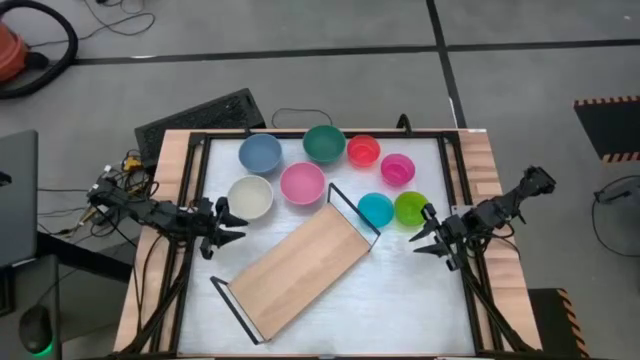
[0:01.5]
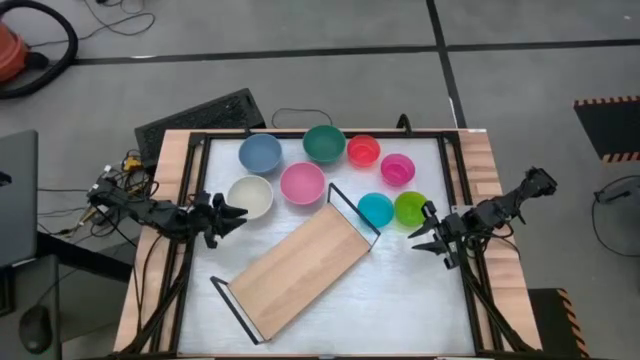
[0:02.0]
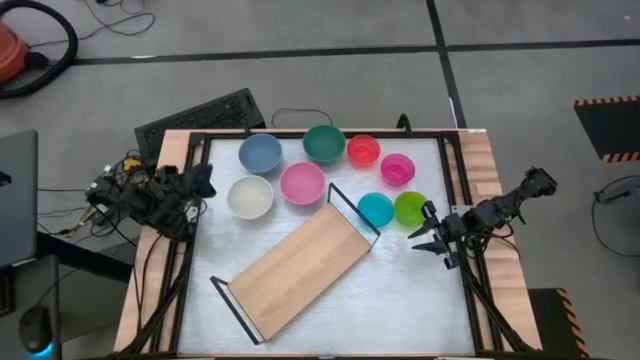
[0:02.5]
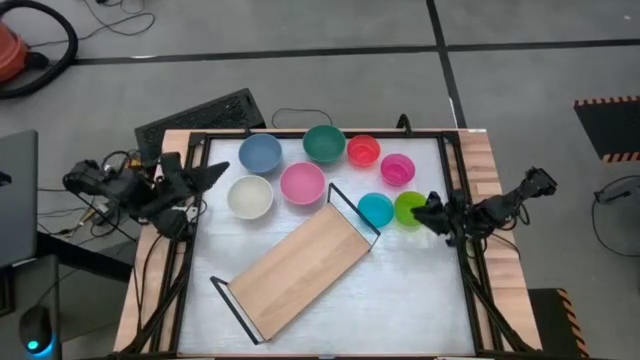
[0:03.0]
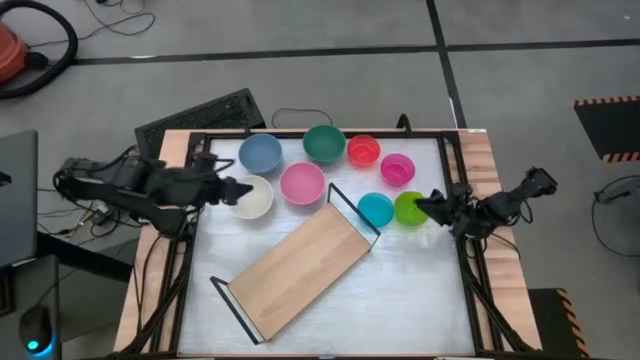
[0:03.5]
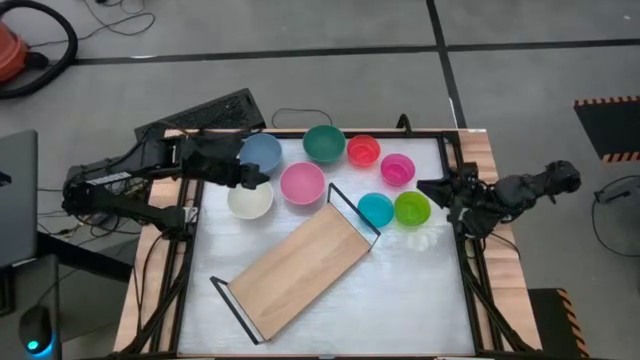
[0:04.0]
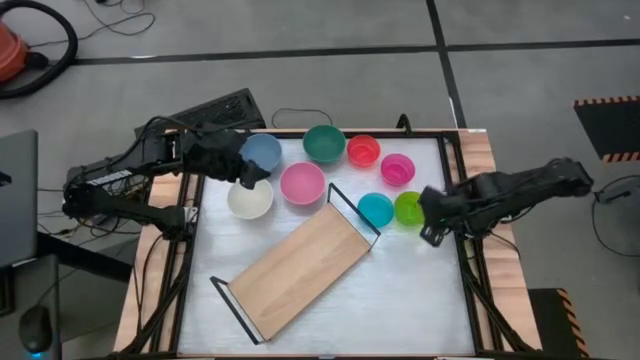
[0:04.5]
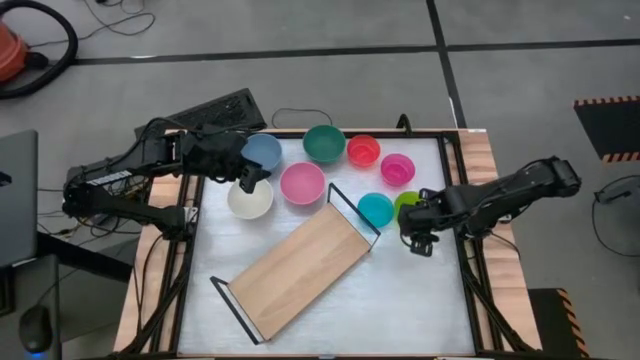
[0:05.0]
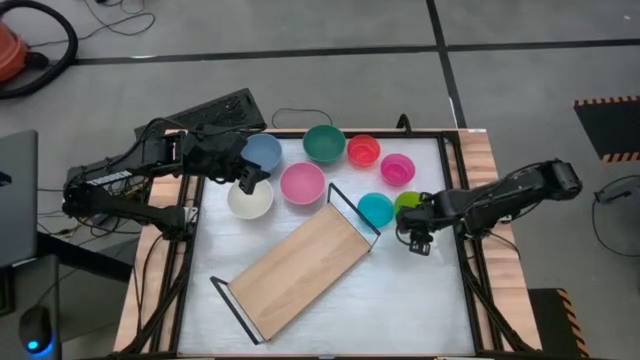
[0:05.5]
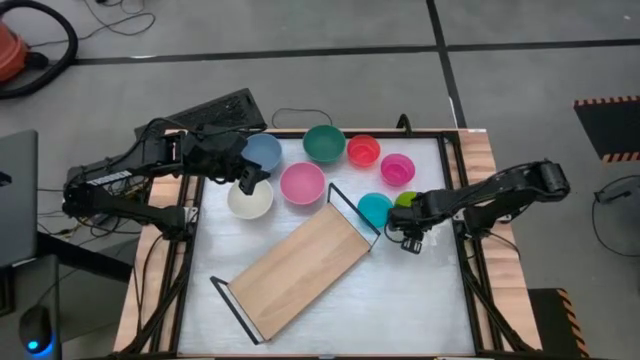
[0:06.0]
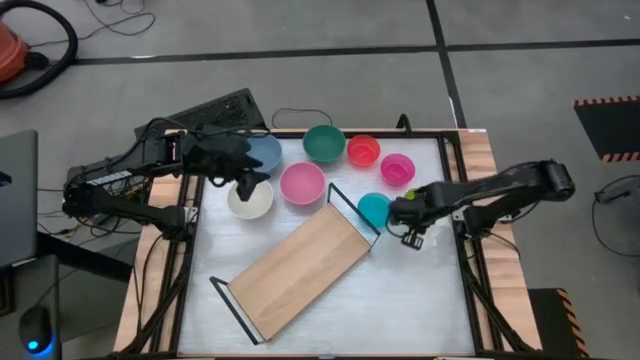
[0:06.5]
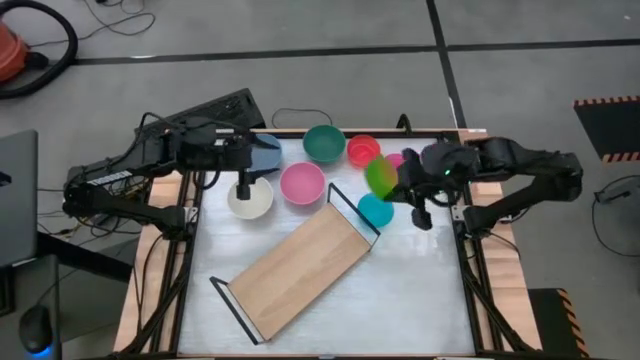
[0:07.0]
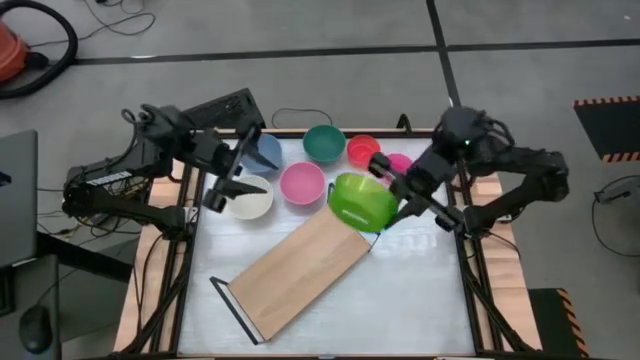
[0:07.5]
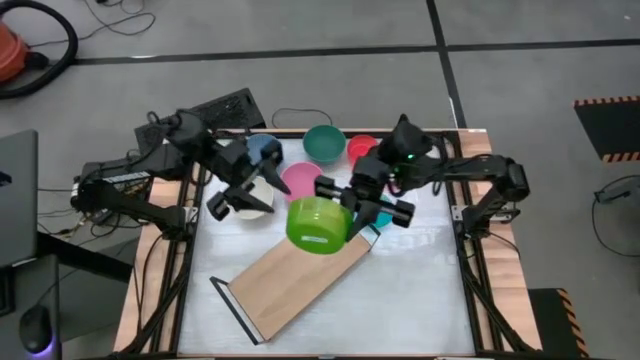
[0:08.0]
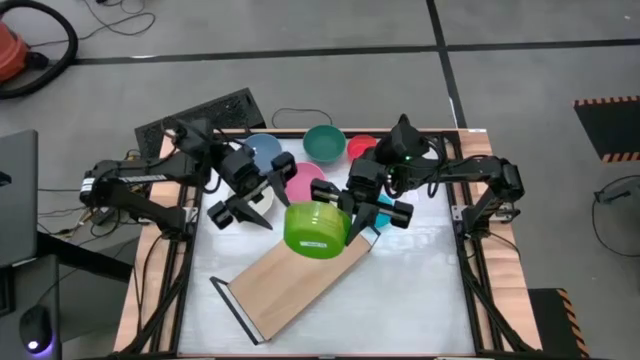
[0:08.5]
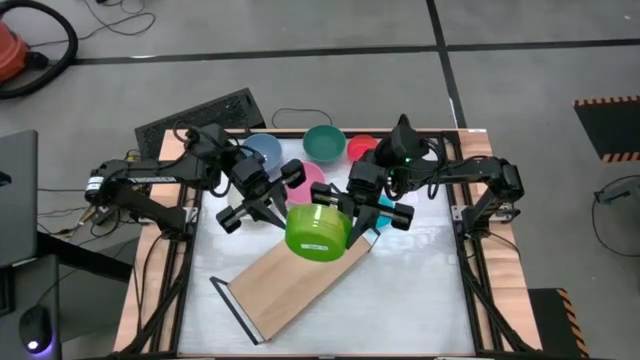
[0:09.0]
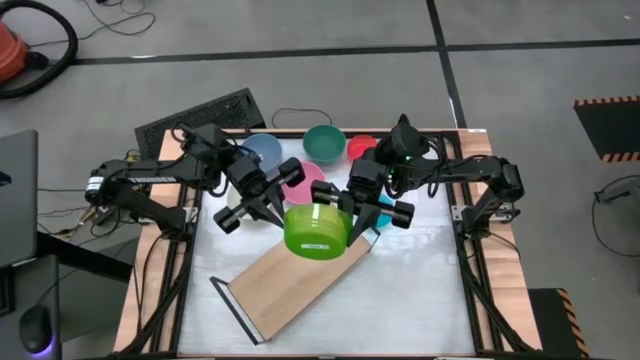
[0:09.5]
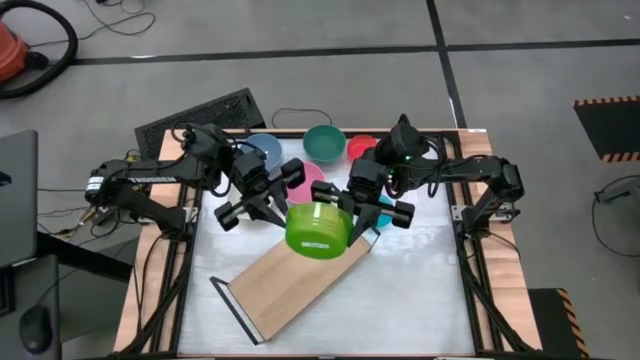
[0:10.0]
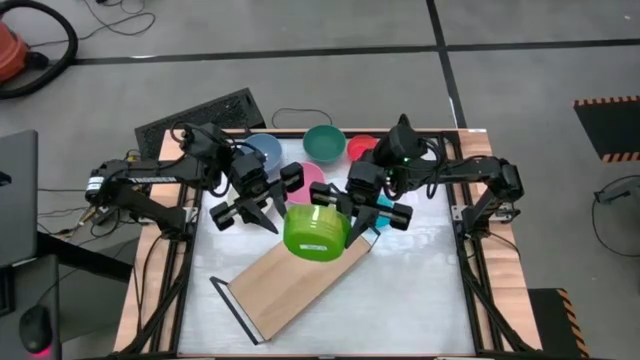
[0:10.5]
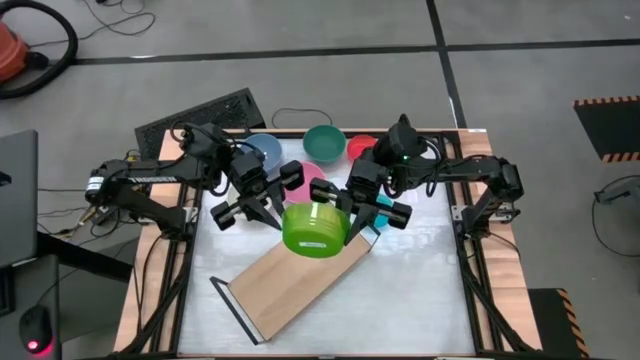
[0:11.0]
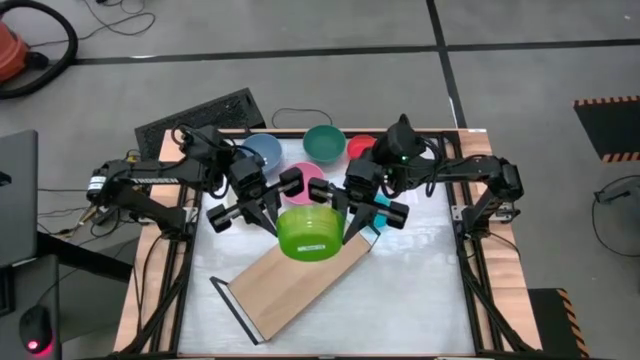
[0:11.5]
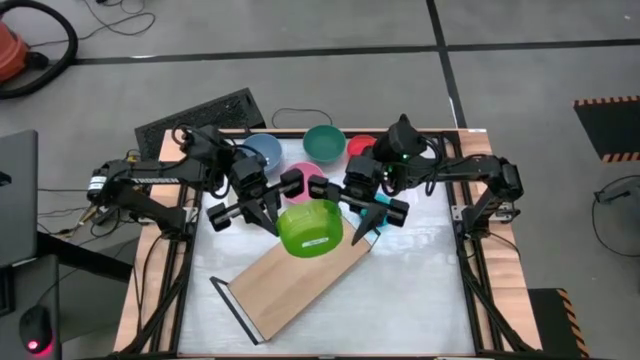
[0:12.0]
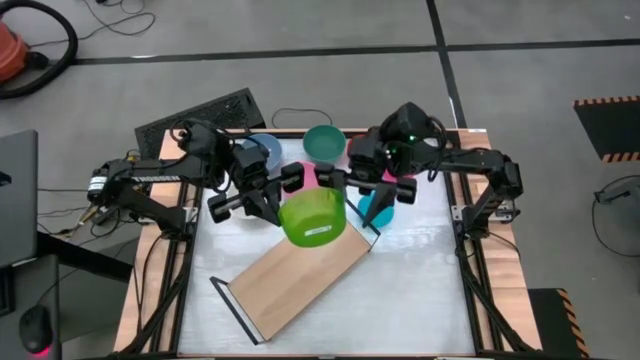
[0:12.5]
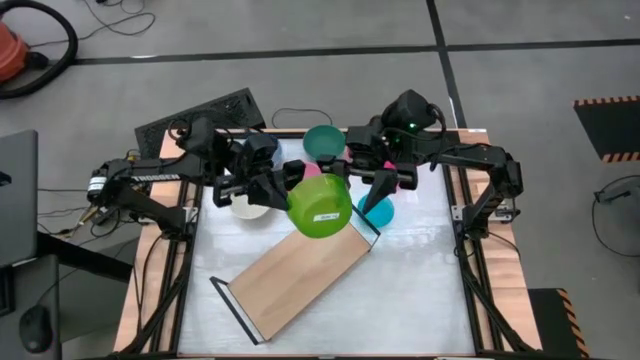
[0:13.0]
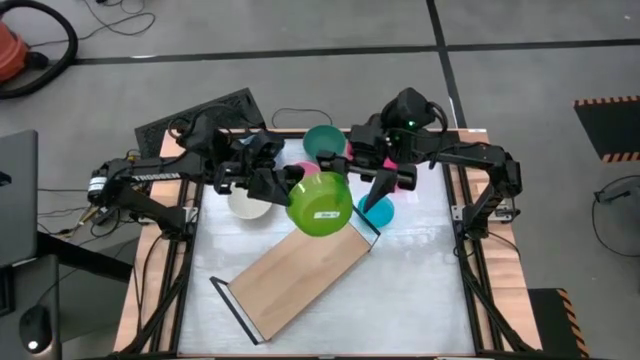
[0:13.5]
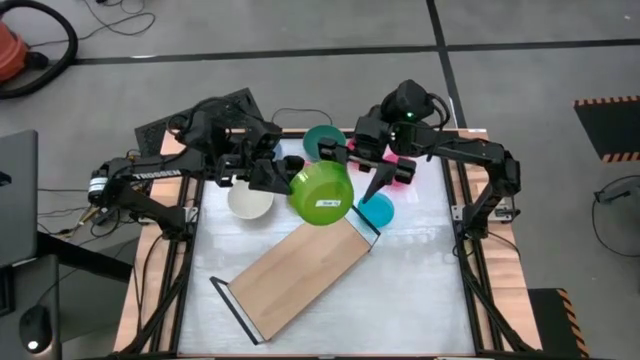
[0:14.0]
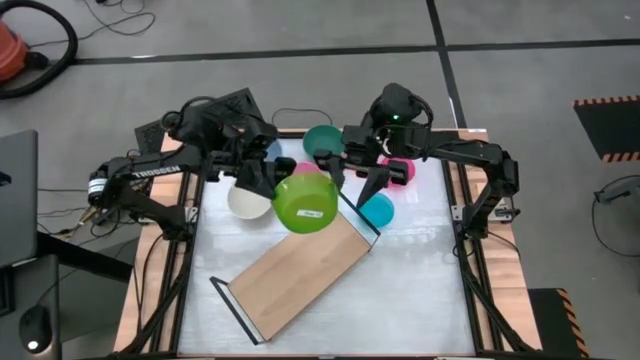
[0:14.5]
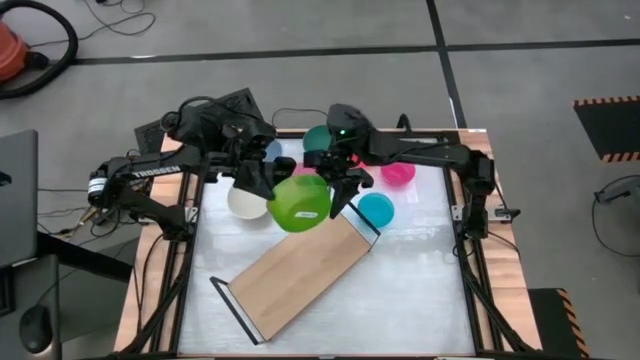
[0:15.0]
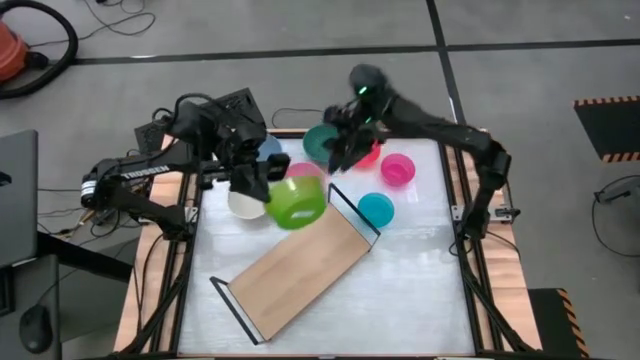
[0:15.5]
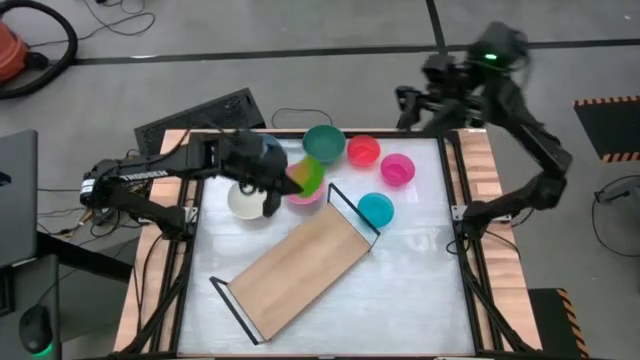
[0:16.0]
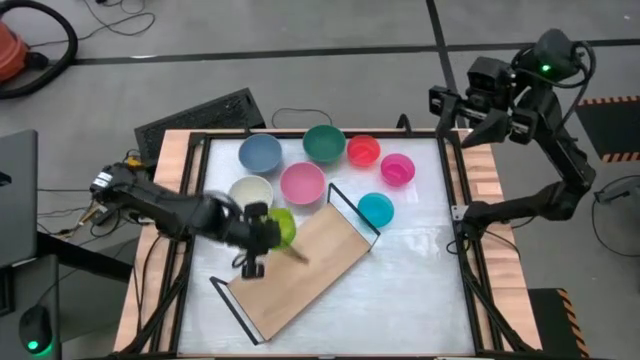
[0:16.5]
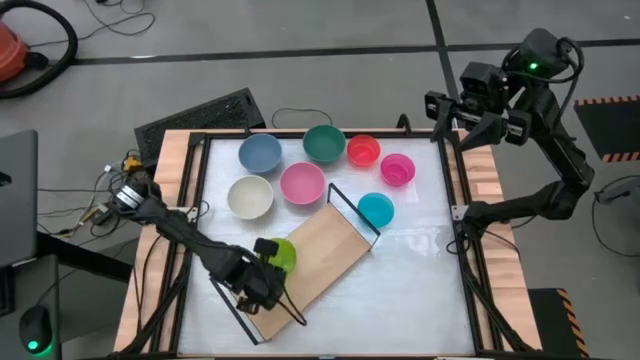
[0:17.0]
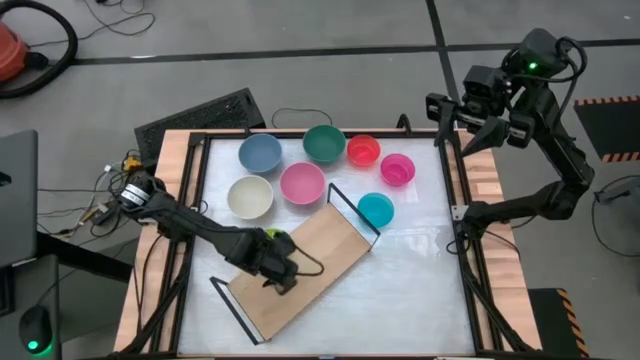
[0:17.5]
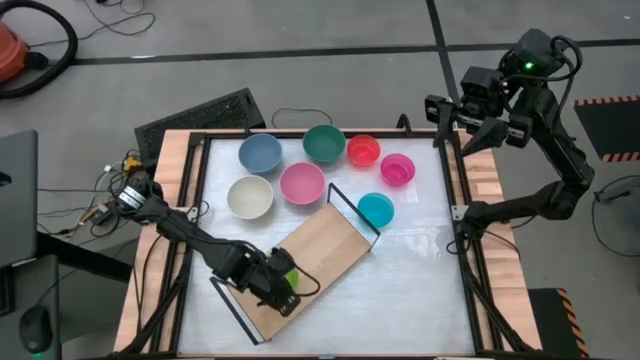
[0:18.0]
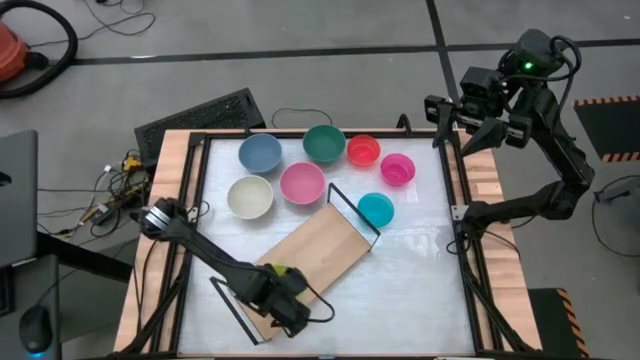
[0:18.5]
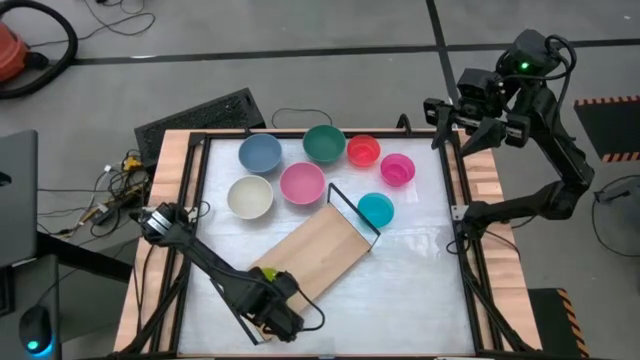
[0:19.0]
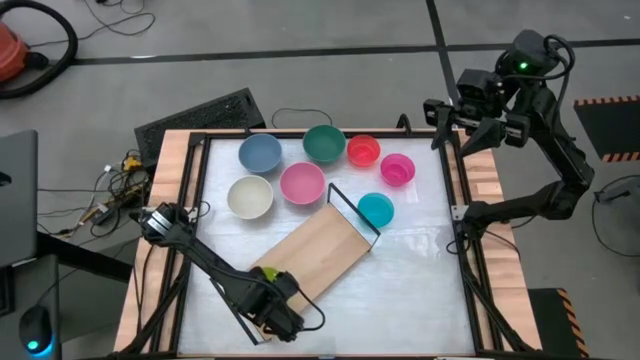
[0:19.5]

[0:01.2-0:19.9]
Task: Place and stack bowls onto a shelf
Put the transparent green bowl on the shelf
